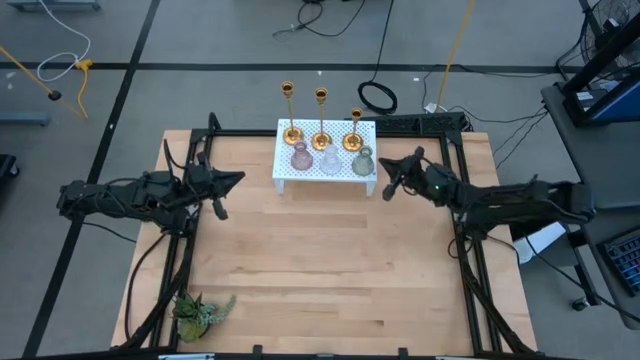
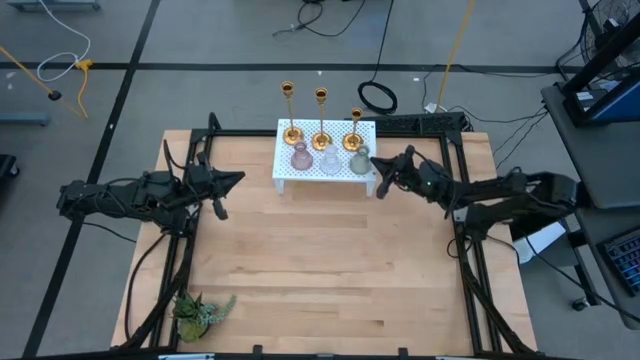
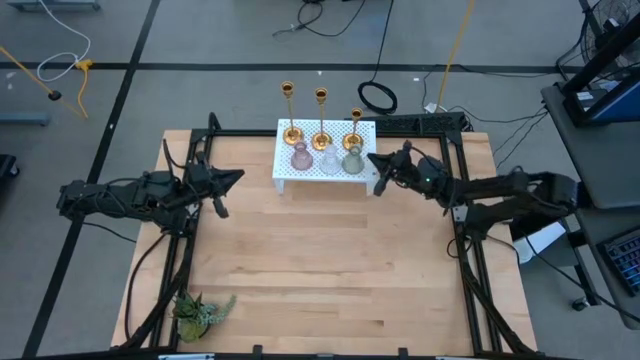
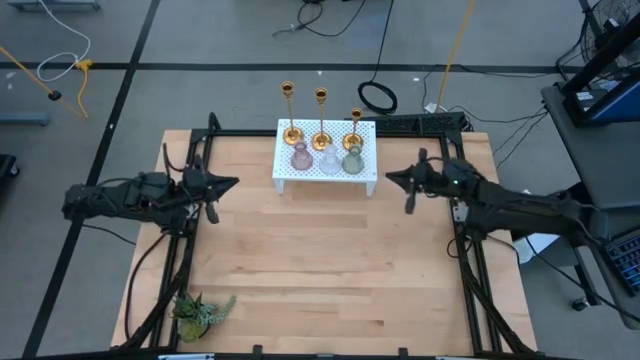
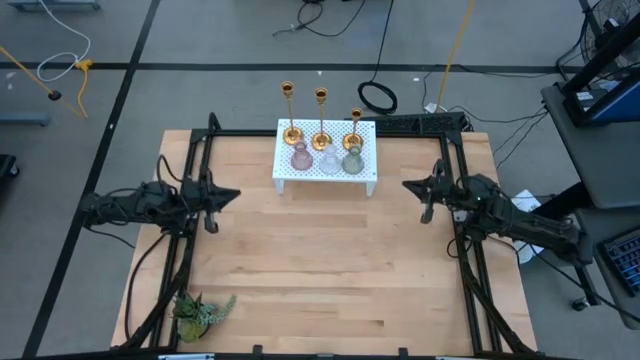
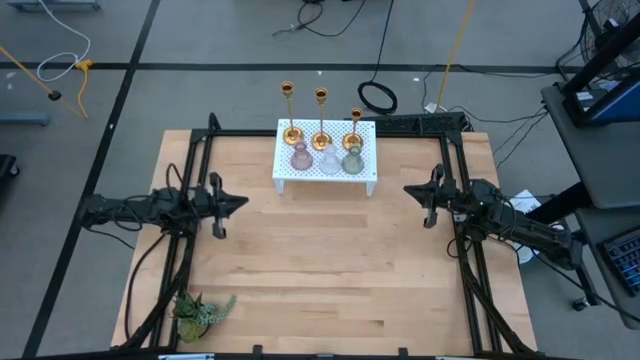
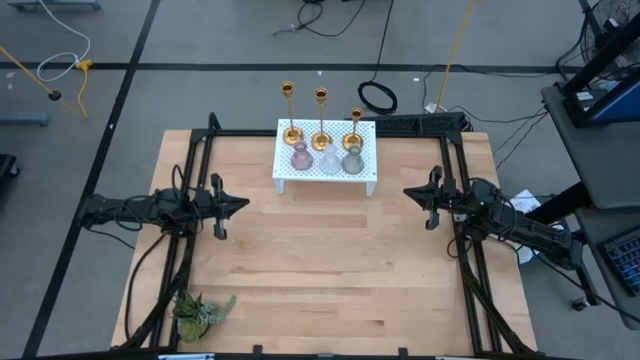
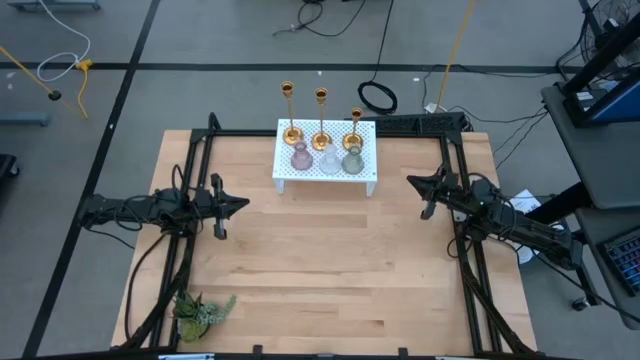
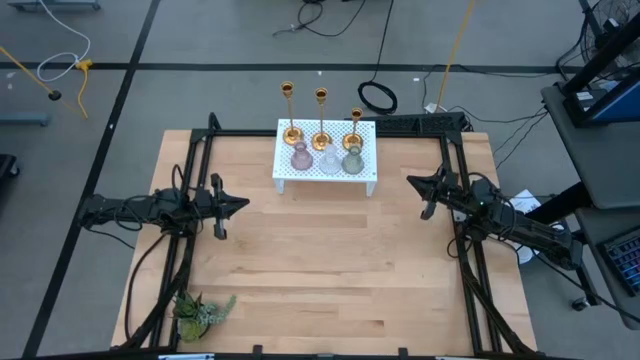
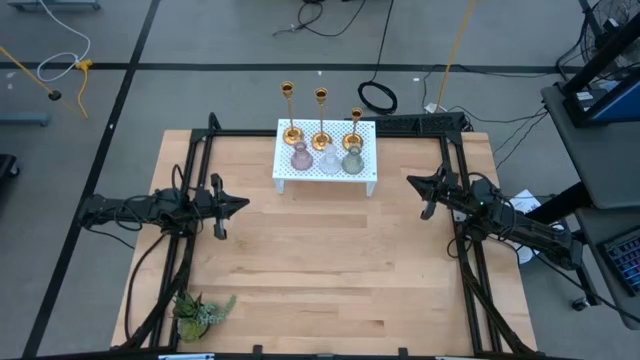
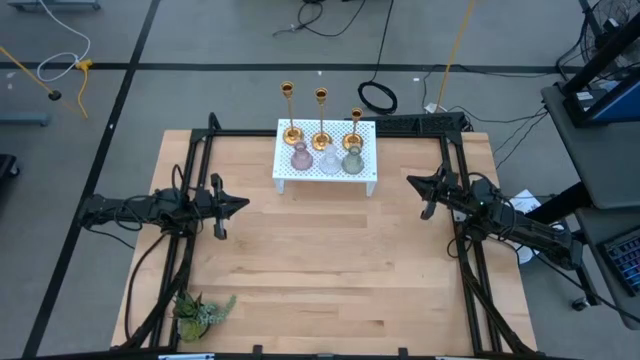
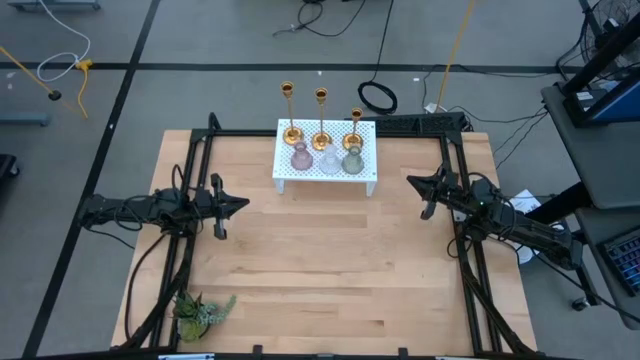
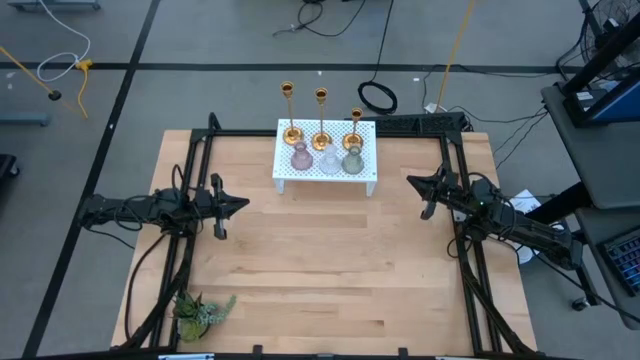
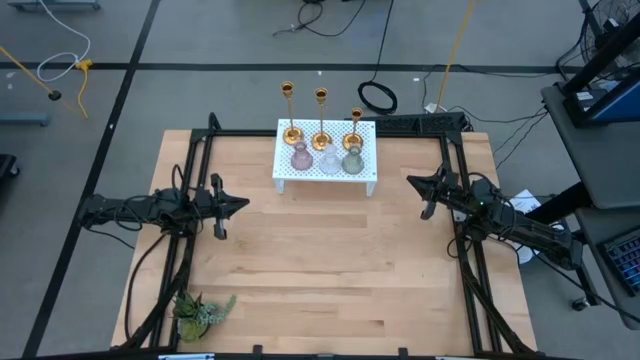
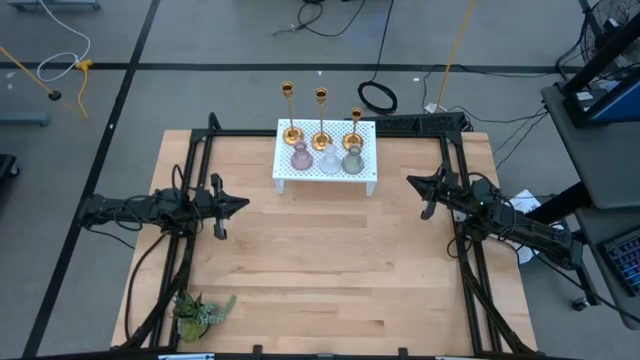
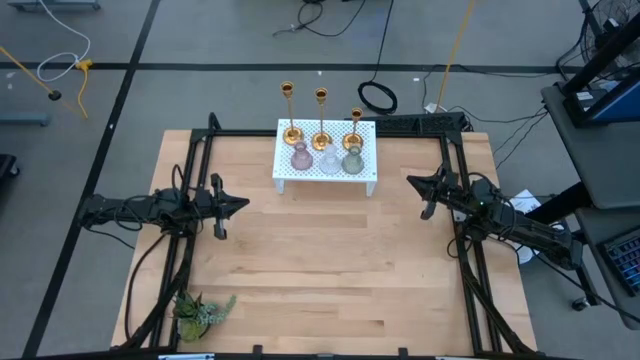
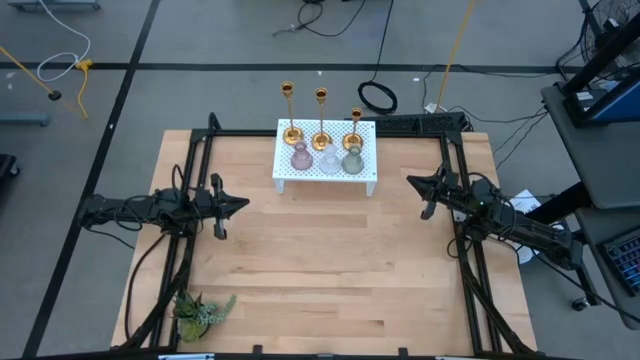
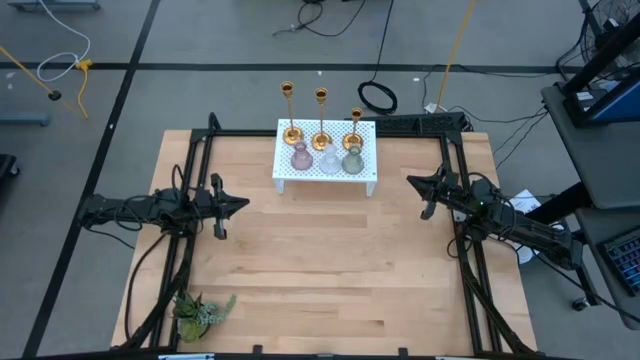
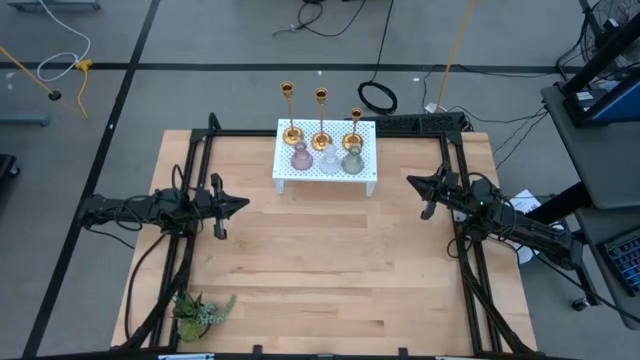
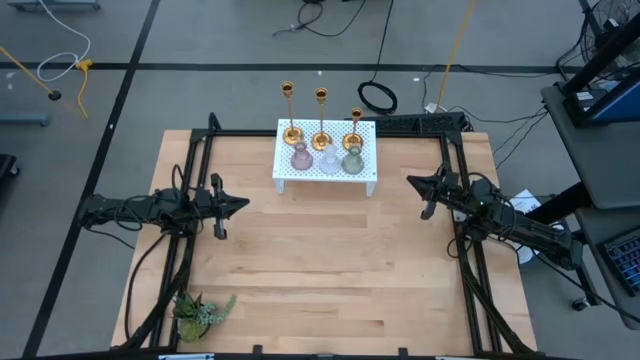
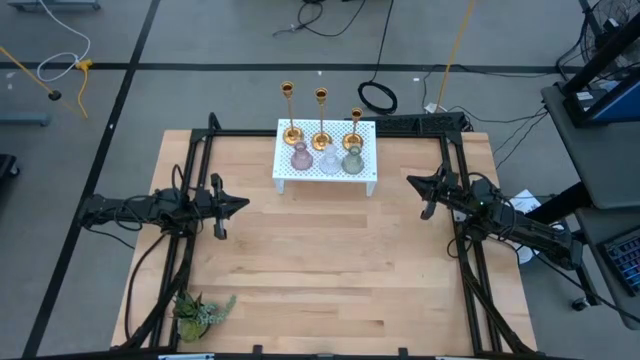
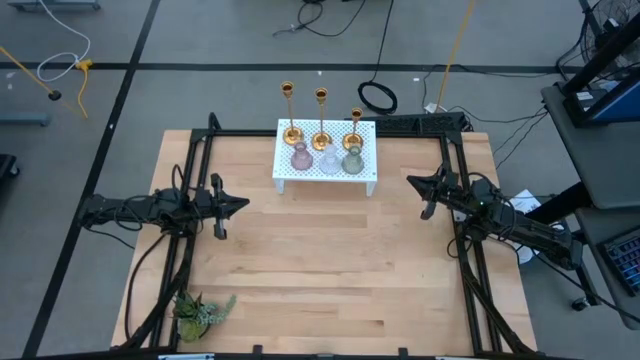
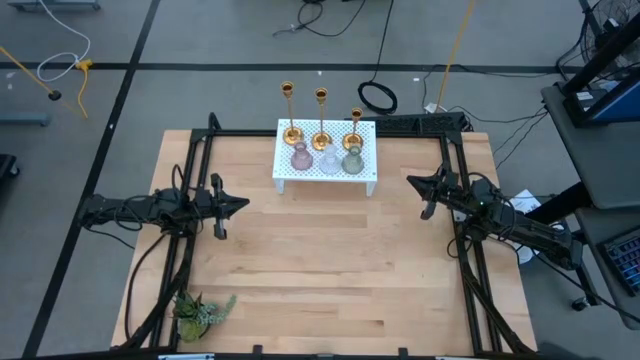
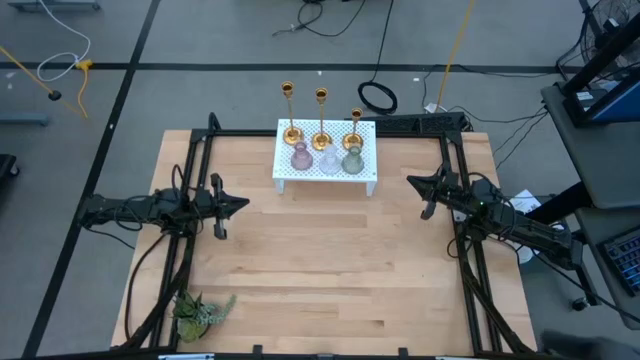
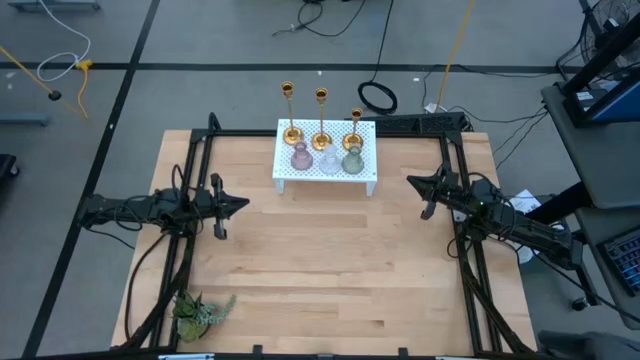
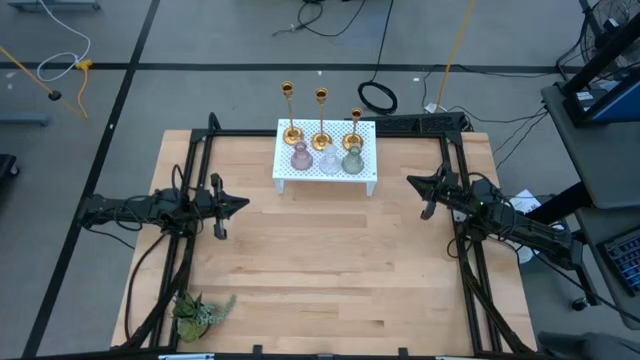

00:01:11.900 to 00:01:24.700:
Task: Pick & Place candle stick holders
Return to Home Position

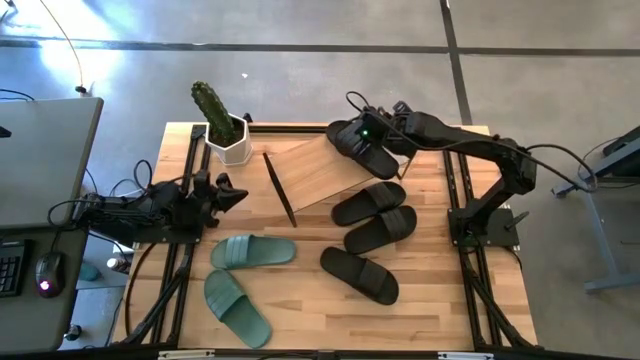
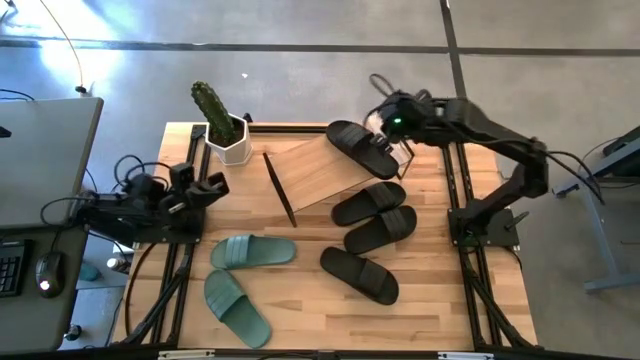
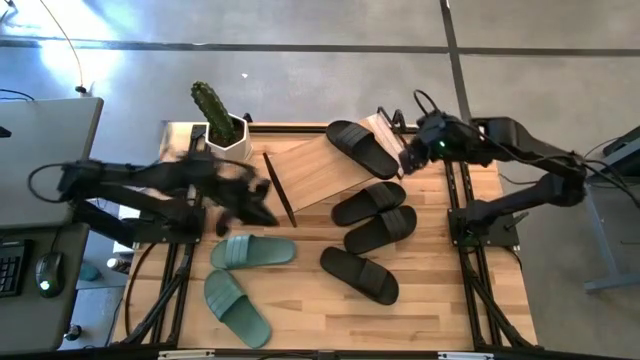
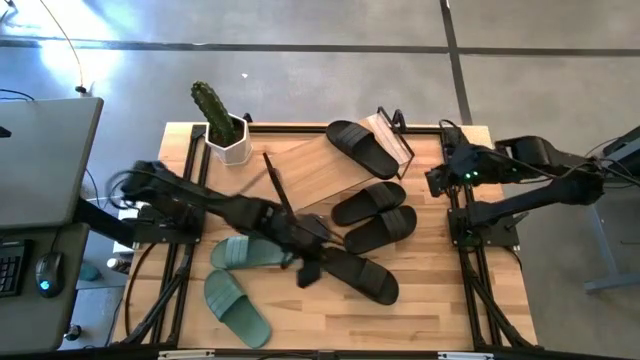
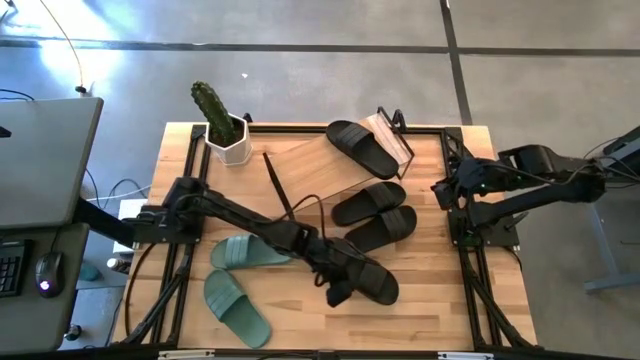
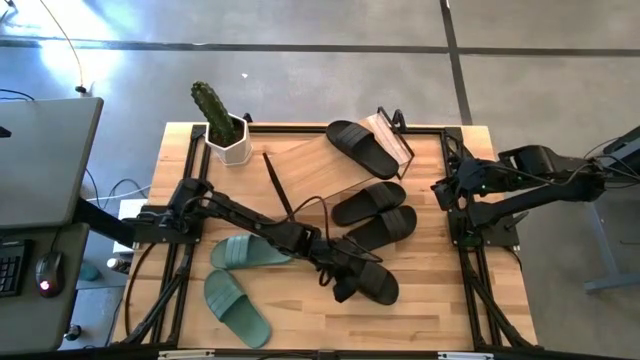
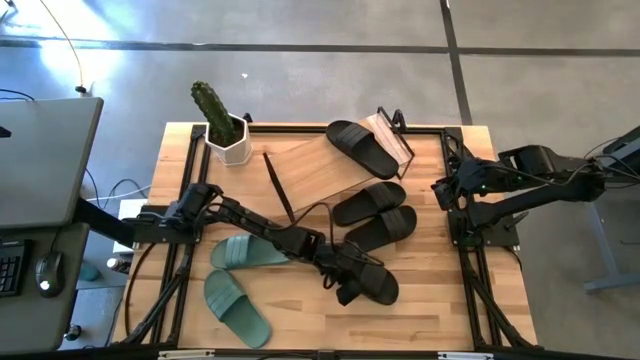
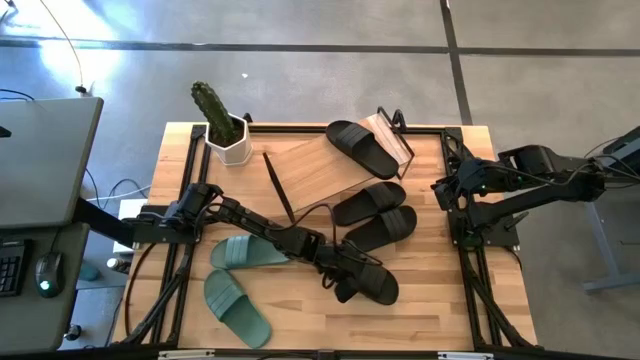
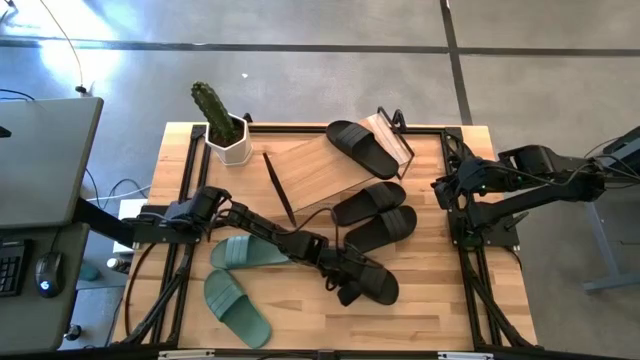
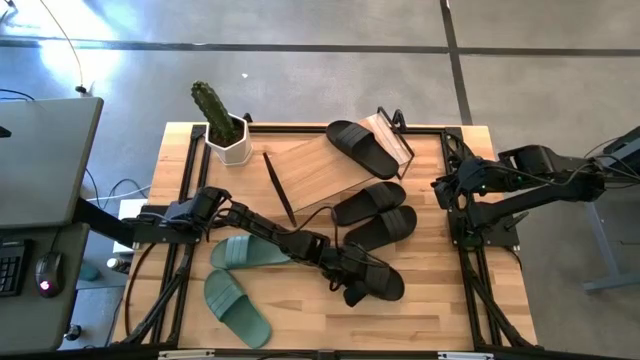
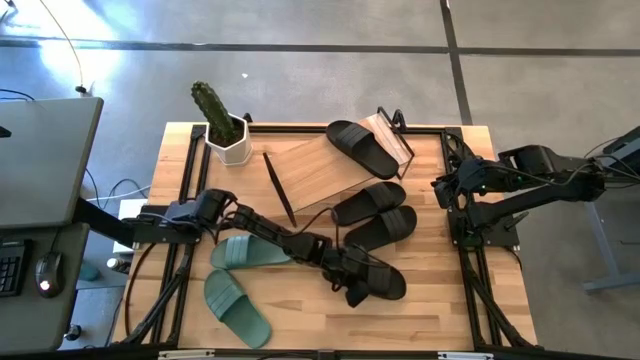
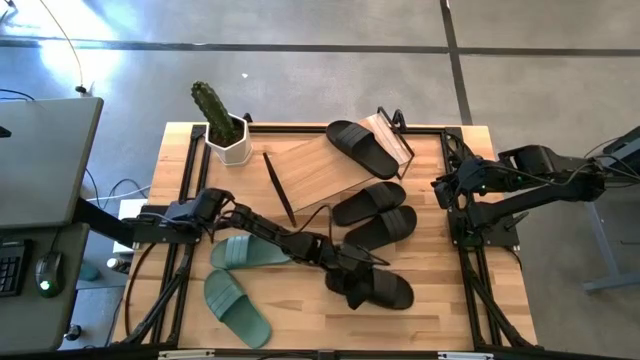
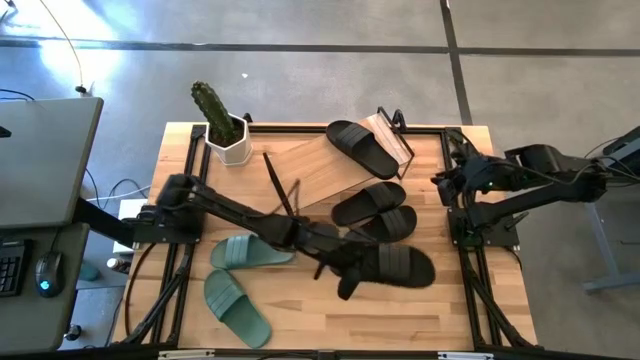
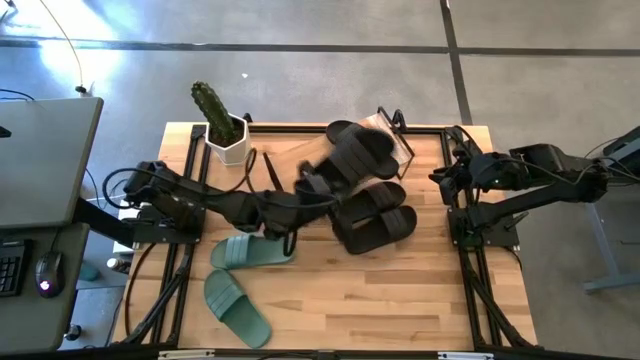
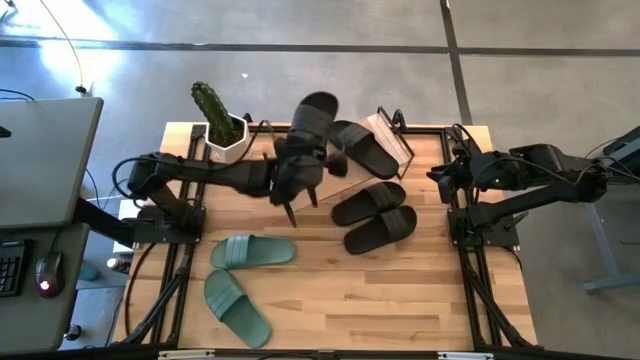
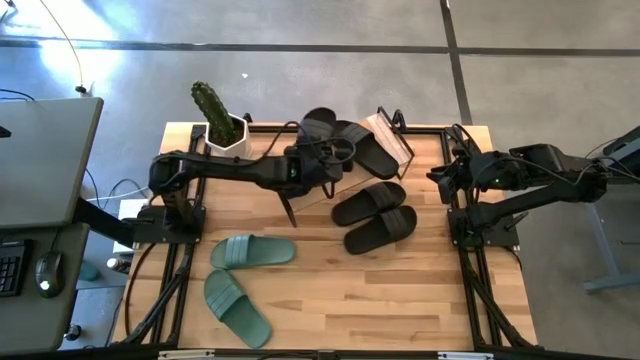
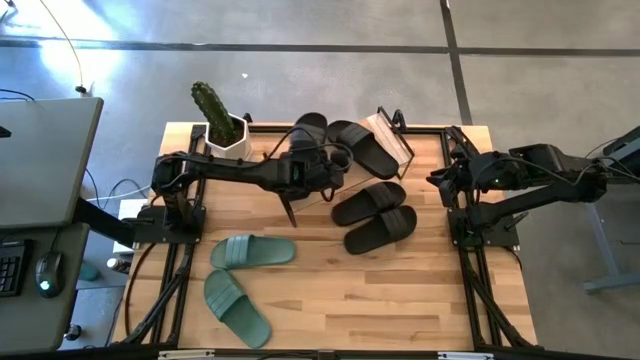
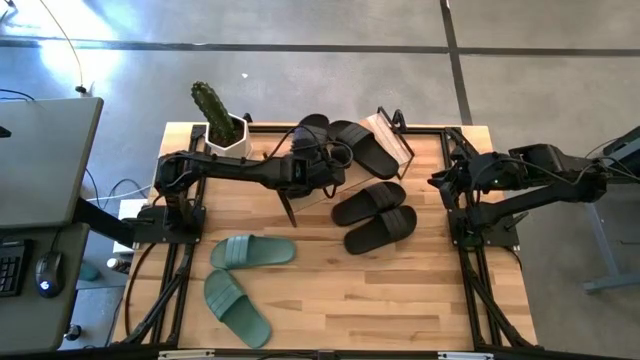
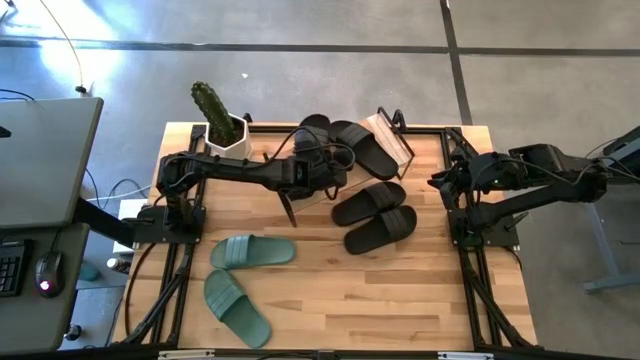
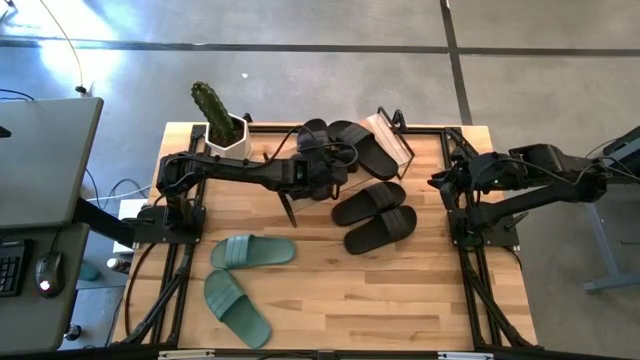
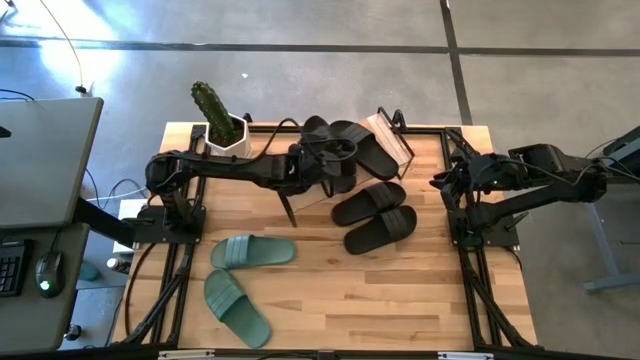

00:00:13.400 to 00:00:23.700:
Task: Pick and place slides into the shelf
Put the black slipper on the shelf
